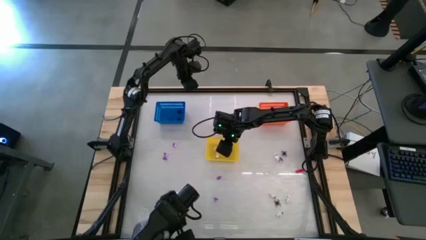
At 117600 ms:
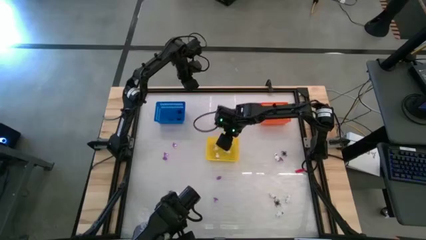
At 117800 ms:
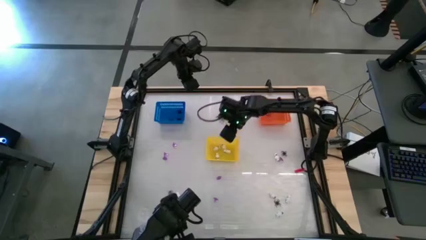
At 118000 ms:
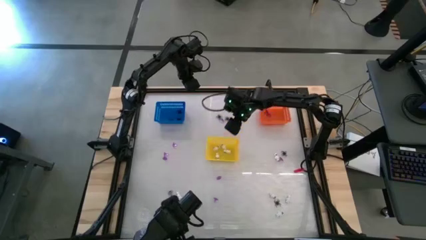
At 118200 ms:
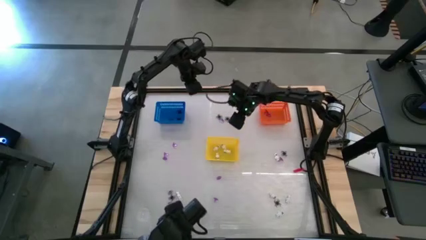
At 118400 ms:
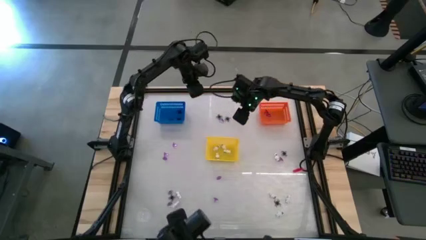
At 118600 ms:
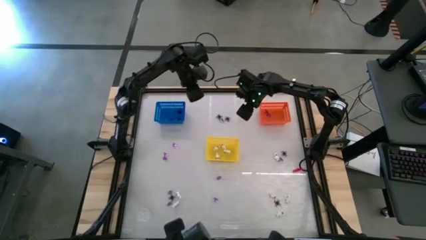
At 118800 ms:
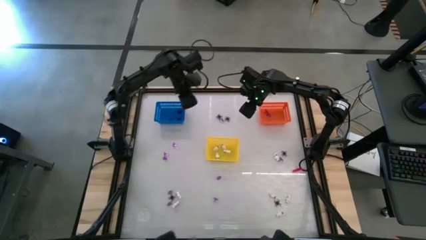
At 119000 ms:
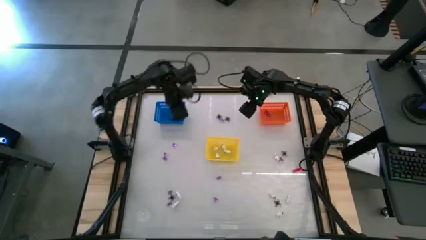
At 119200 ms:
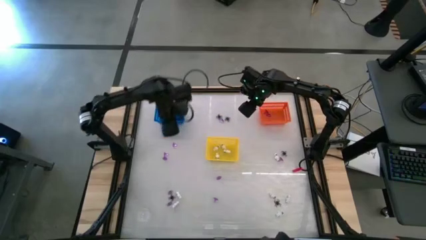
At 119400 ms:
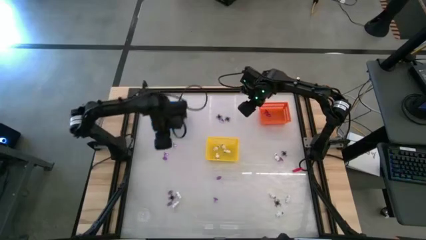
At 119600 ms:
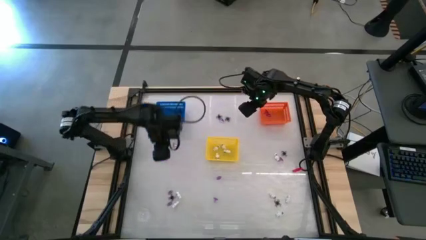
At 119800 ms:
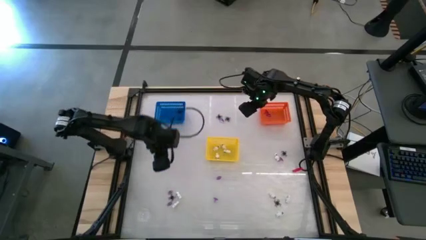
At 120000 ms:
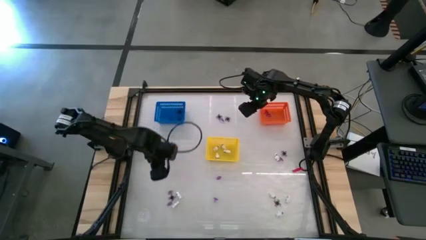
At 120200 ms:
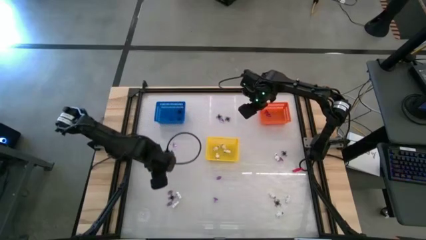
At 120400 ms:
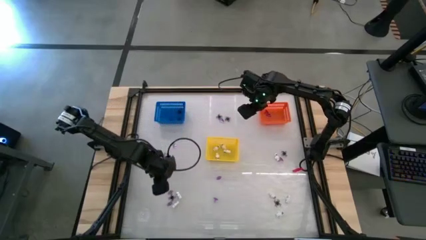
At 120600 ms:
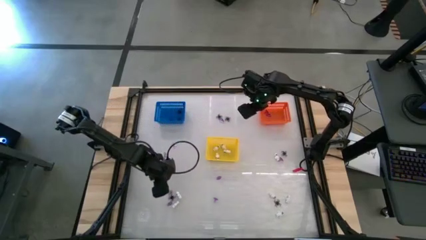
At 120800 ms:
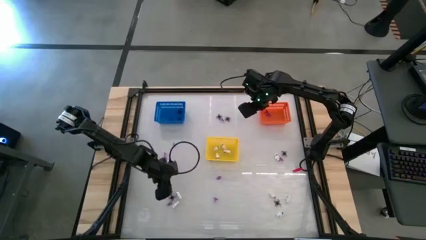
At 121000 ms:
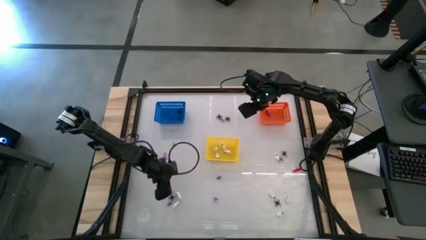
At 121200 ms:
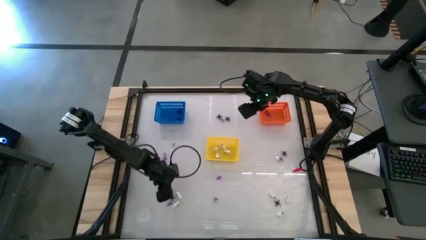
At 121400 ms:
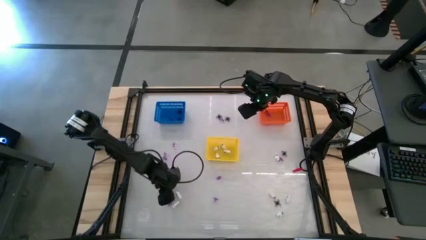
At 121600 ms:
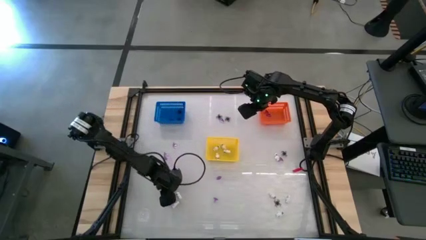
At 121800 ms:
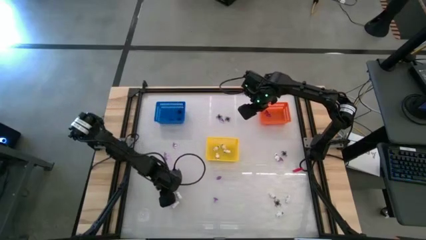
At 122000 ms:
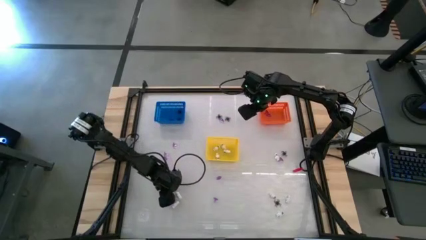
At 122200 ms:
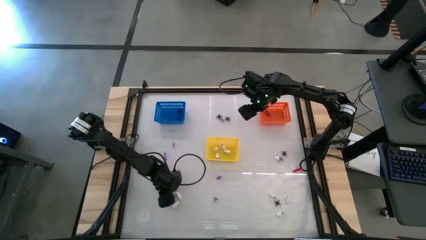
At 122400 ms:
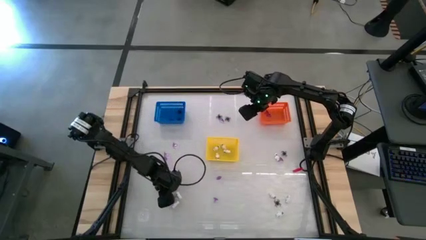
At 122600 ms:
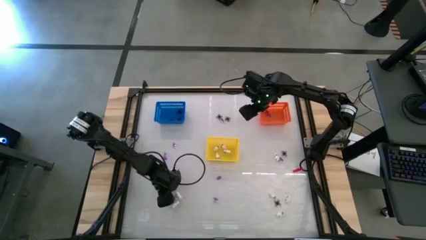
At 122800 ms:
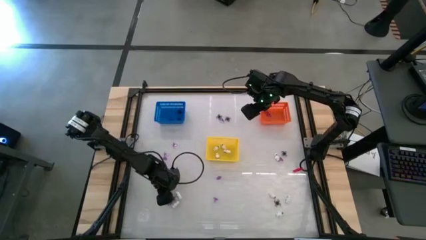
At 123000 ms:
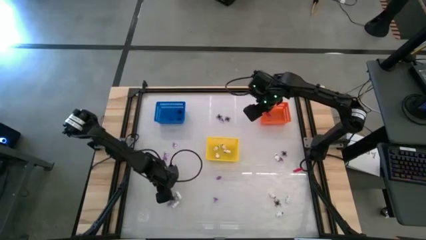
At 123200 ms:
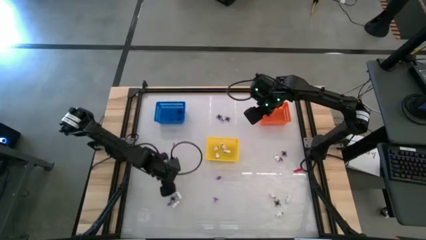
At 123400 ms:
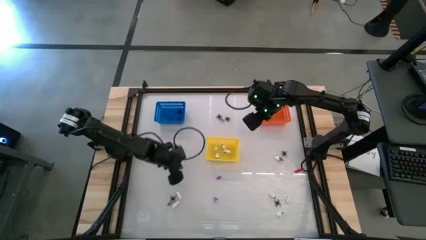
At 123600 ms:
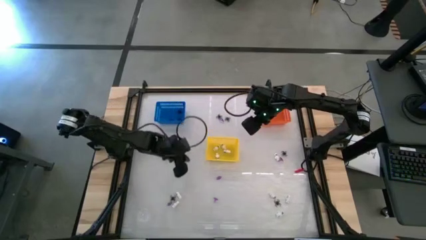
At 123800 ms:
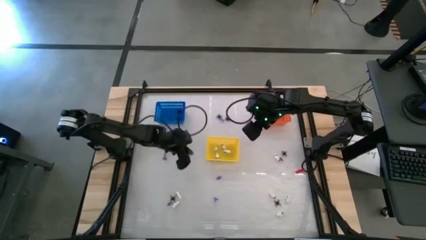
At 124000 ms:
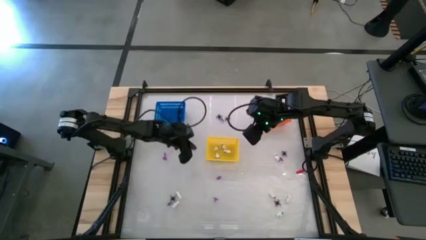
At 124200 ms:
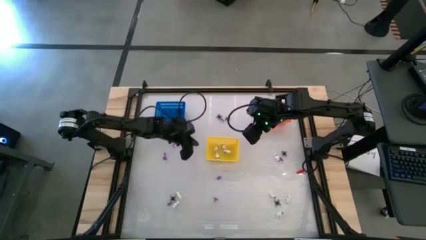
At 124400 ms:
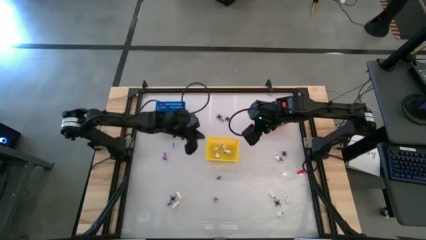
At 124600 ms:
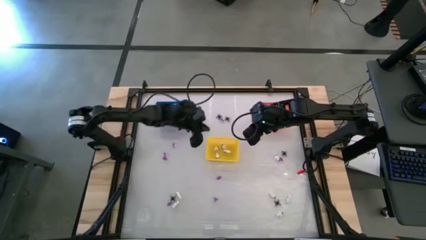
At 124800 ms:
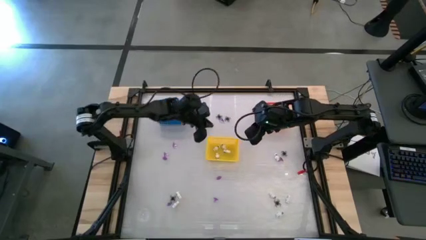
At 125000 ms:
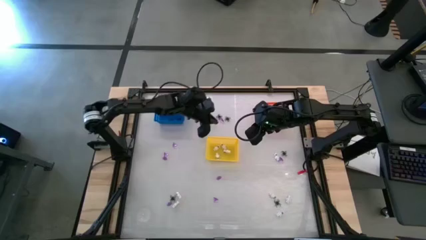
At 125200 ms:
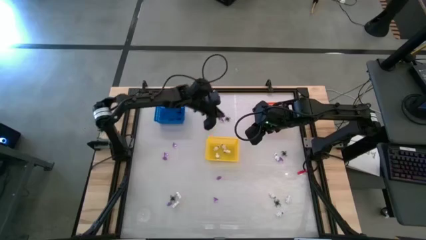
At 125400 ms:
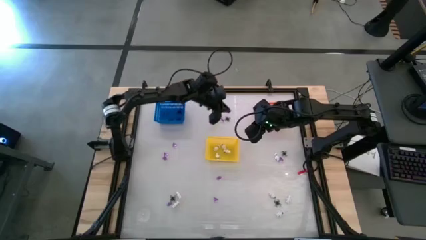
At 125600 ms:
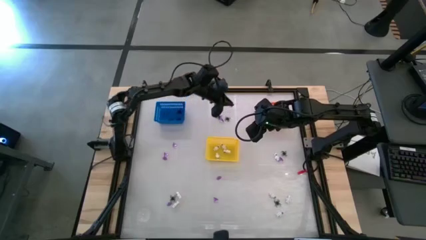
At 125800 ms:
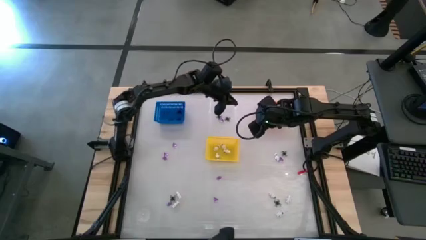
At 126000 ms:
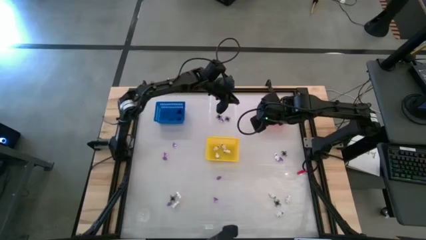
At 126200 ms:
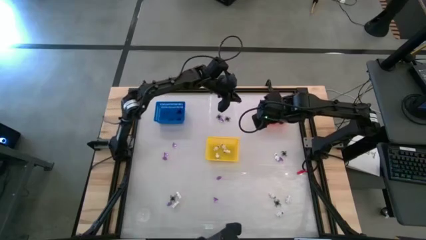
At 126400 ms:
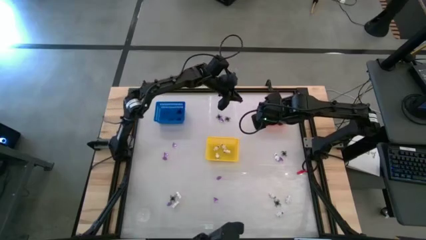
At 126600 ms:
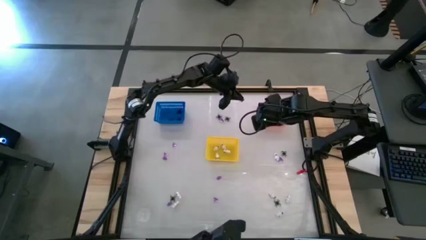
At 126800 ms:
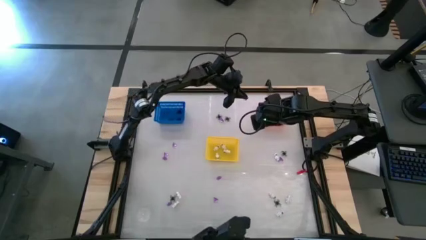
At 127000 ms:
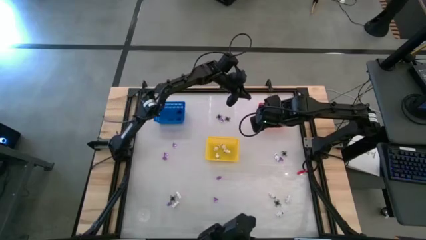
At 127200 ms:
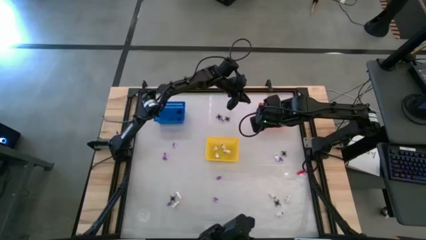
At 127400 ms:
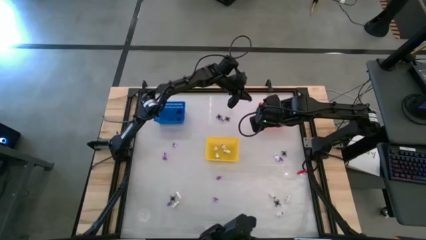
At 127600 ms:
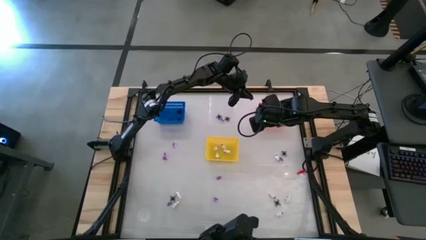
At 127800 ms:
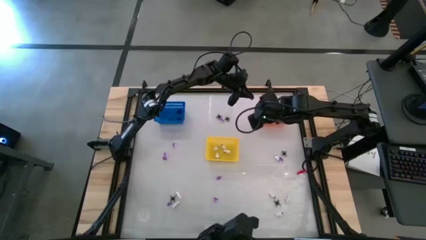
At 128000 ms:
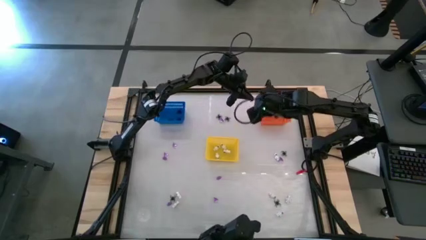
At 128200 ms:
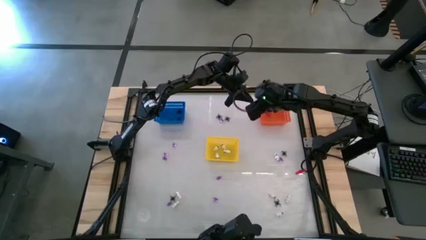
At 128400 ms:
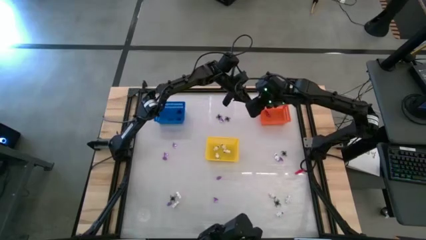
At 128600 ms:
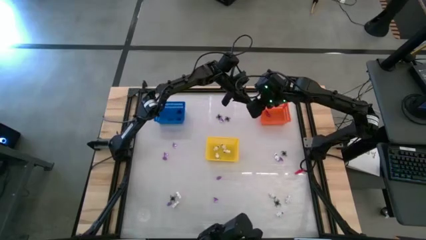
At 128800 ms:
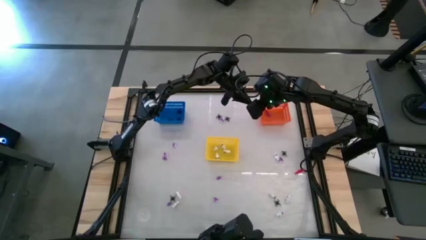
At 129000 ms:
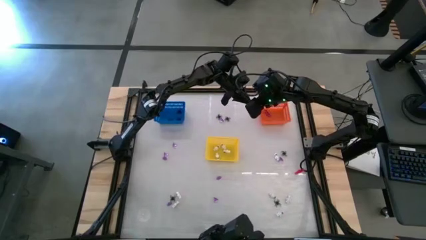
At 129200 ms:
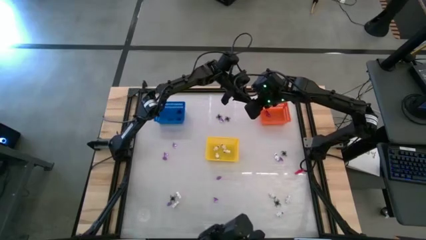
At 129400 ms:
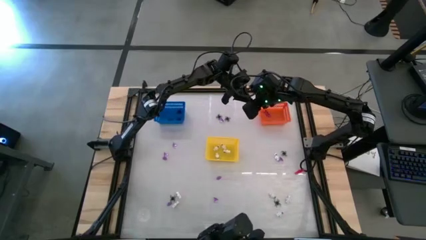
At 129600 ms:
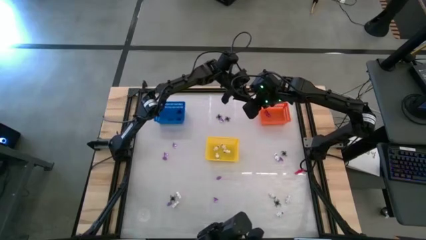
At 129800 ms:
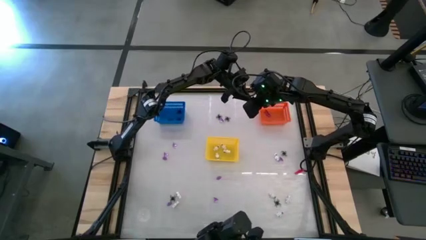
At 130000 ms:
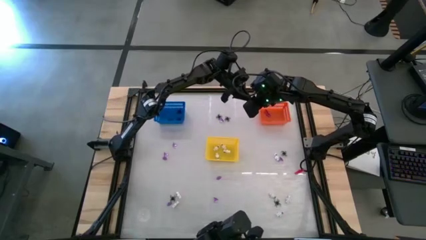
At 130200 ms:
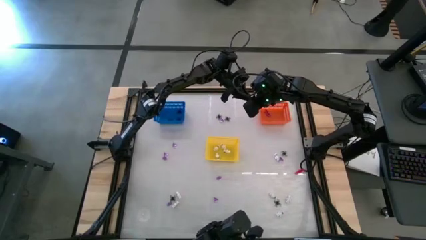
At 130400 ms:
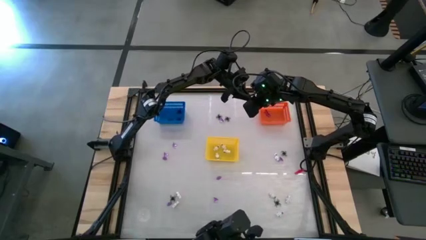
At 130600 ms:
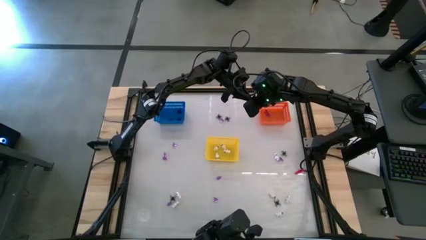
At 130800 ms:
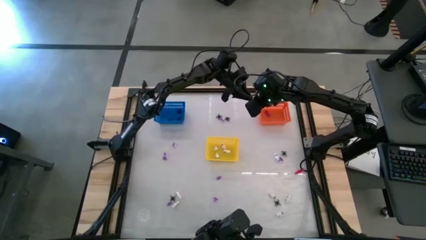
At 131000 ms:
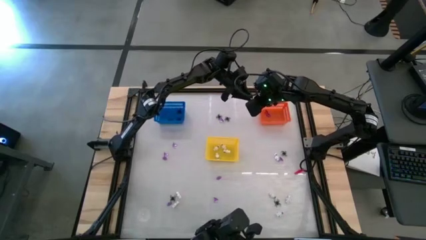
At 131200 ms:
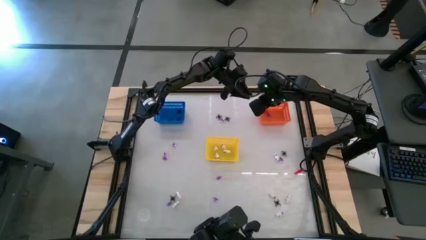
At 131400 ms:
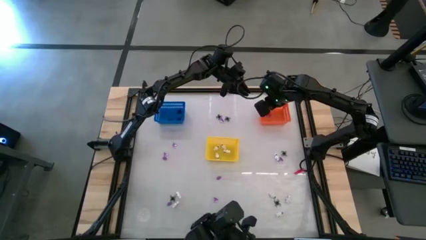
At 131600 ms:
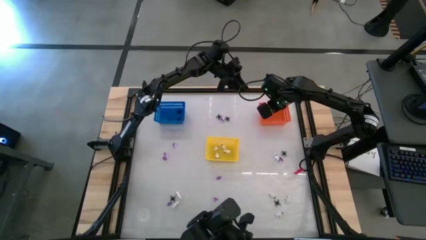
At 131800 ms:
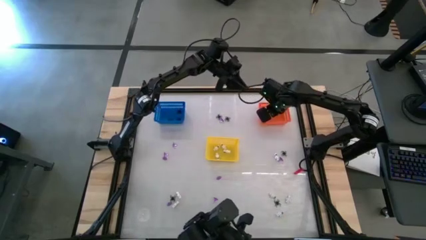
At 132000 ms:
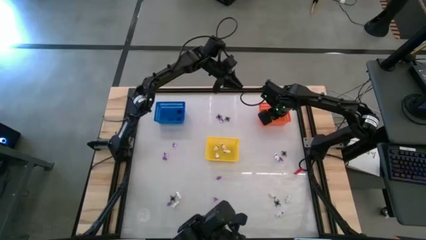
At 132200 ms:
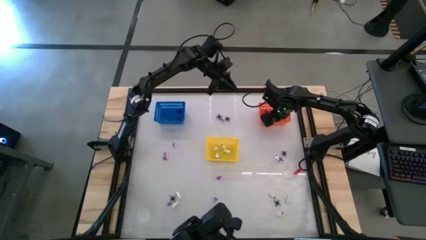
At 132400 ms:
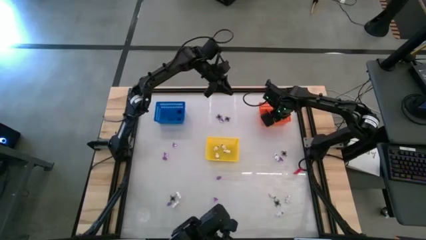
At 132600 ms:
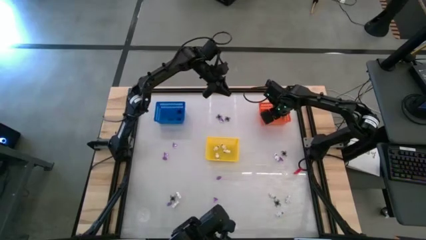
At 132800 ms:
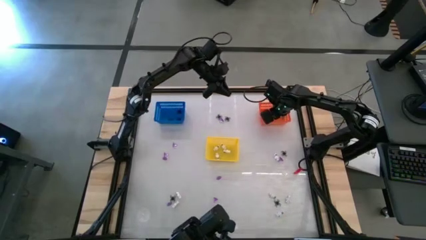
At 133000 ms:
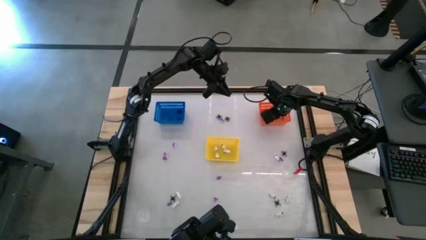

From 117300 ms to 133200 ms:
Task: Sort Halloween decoration
Put the purple witch hat toy into the orange bin
